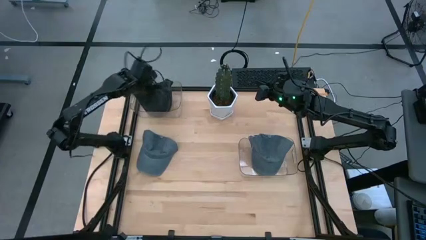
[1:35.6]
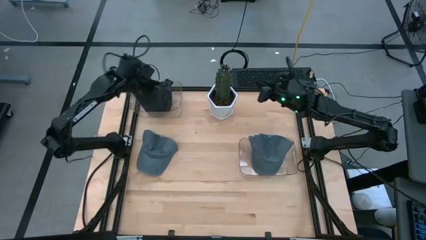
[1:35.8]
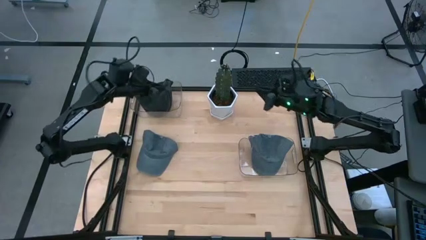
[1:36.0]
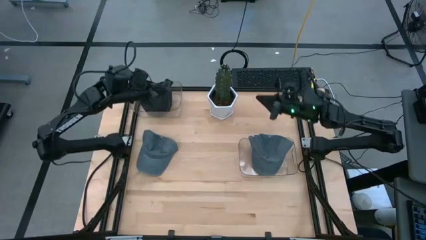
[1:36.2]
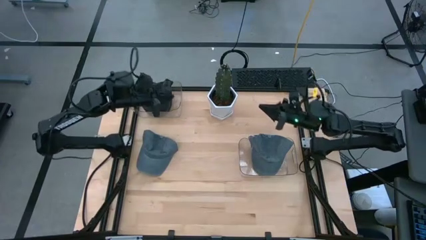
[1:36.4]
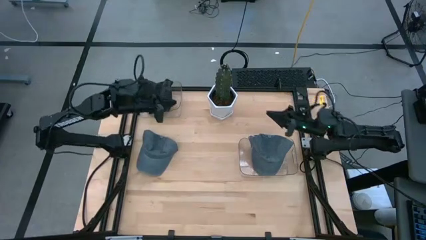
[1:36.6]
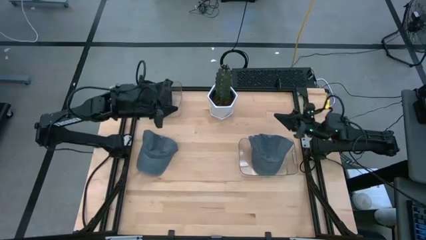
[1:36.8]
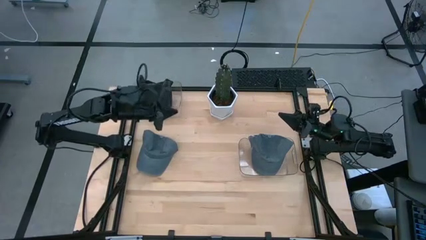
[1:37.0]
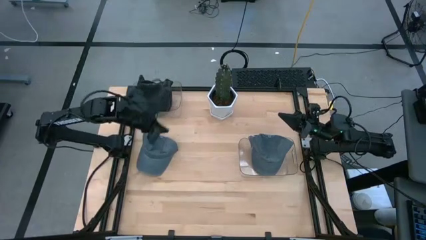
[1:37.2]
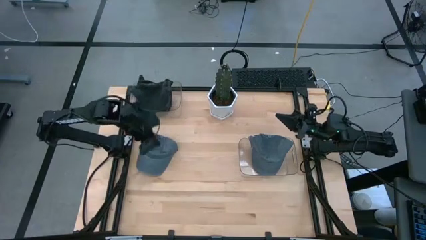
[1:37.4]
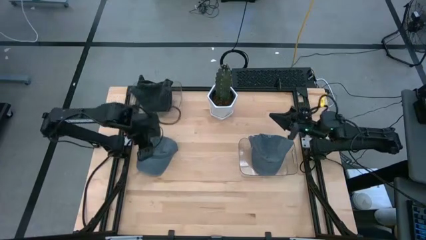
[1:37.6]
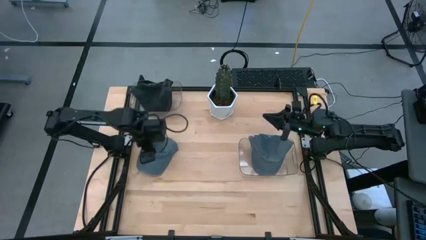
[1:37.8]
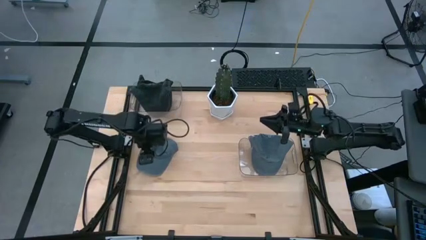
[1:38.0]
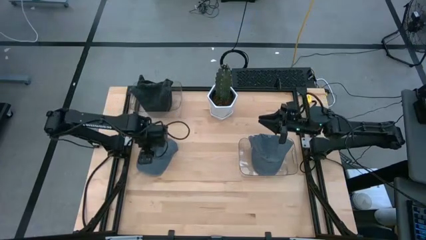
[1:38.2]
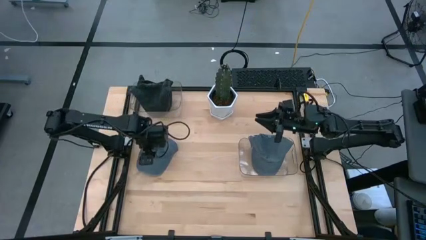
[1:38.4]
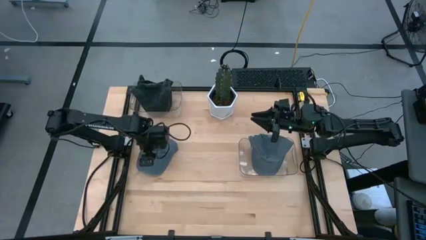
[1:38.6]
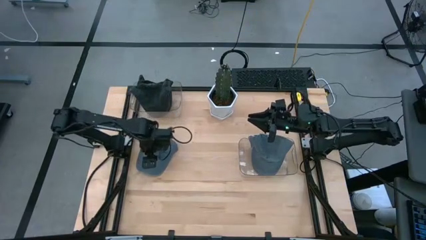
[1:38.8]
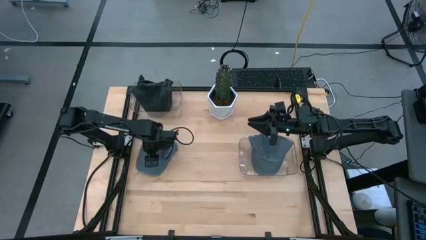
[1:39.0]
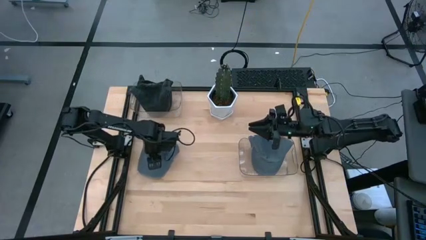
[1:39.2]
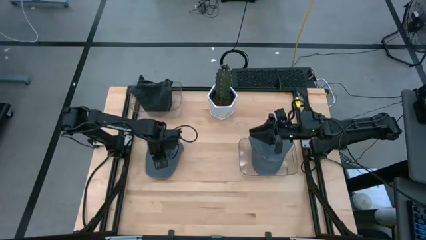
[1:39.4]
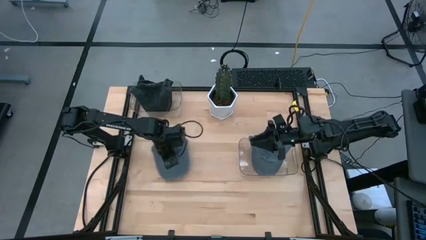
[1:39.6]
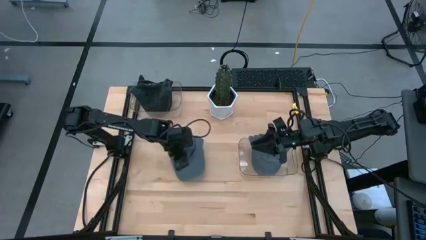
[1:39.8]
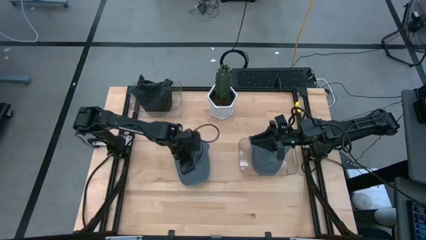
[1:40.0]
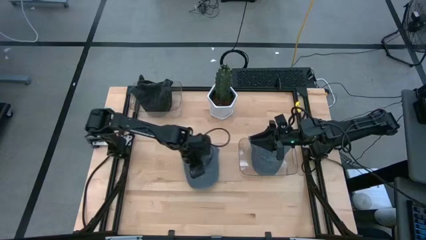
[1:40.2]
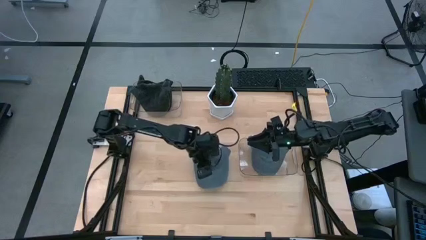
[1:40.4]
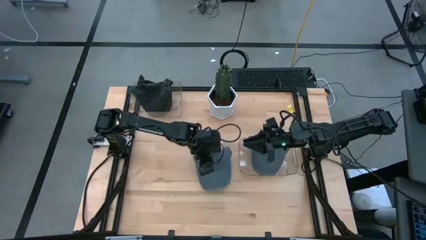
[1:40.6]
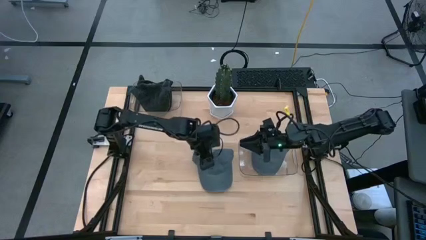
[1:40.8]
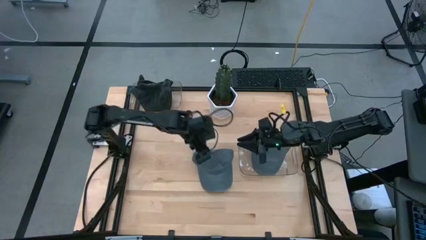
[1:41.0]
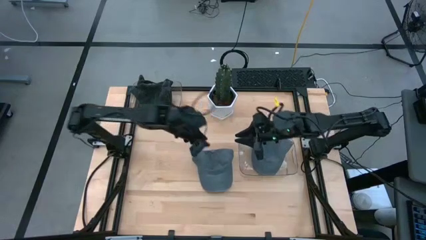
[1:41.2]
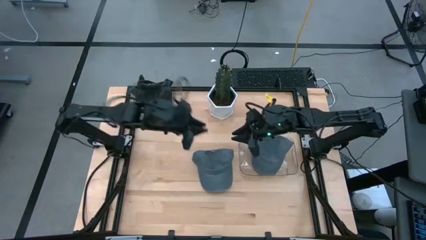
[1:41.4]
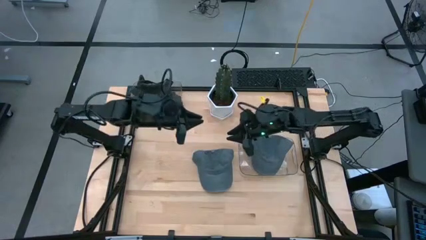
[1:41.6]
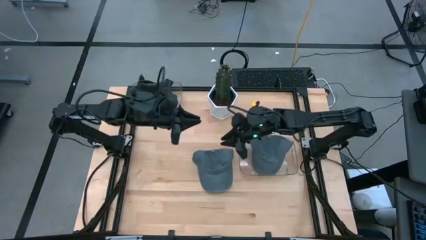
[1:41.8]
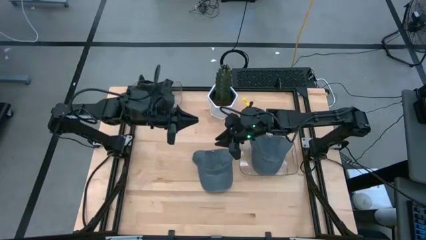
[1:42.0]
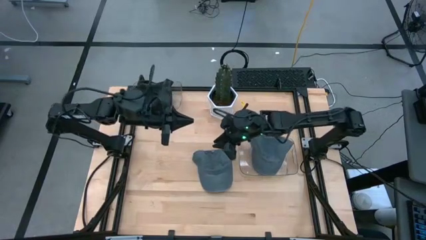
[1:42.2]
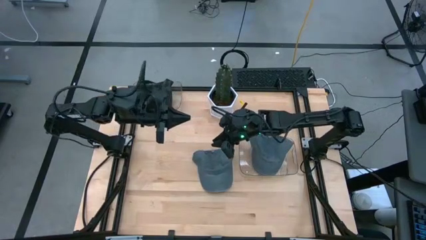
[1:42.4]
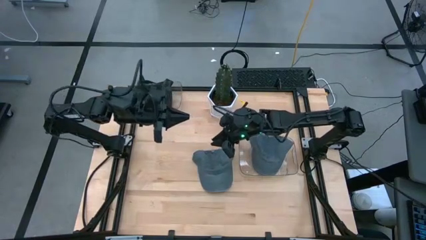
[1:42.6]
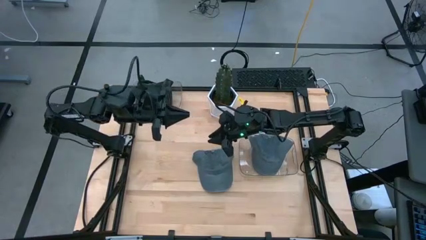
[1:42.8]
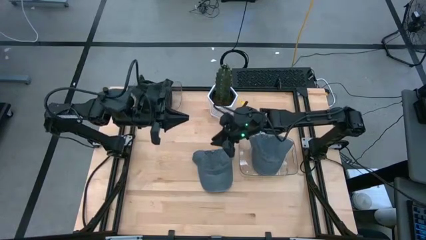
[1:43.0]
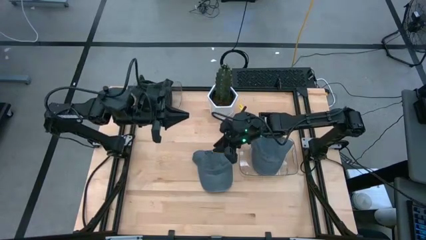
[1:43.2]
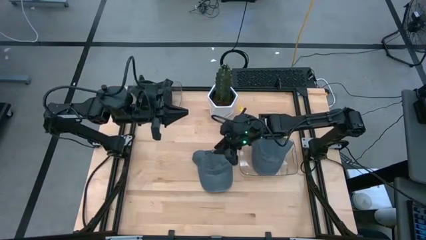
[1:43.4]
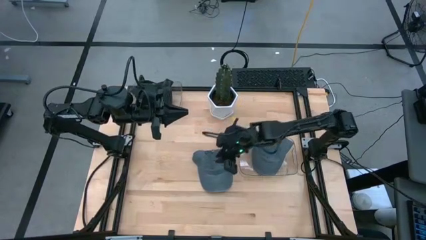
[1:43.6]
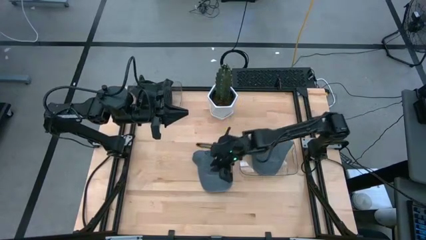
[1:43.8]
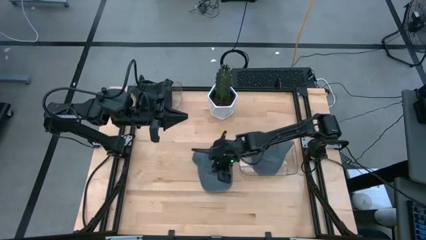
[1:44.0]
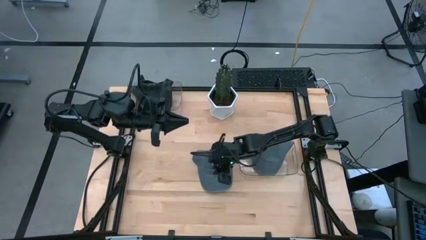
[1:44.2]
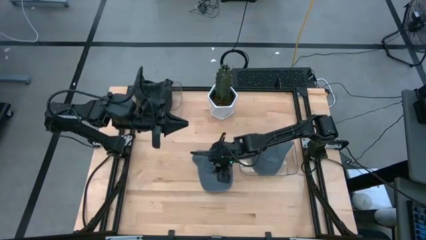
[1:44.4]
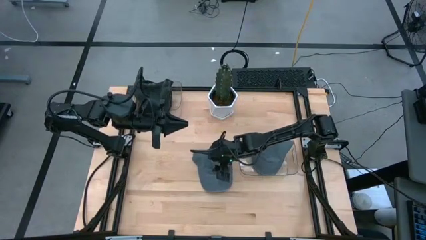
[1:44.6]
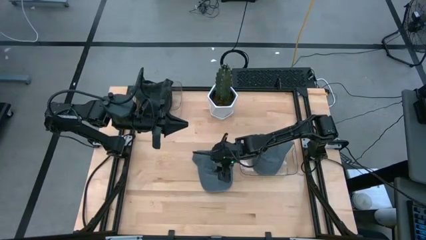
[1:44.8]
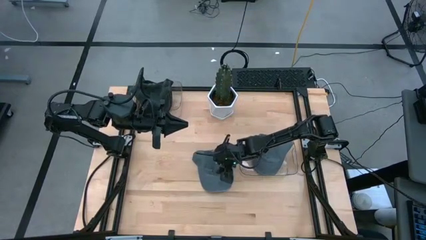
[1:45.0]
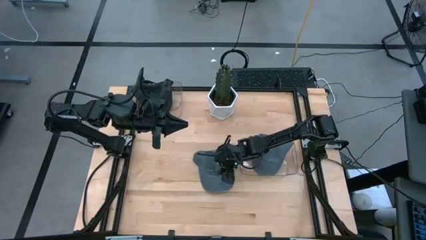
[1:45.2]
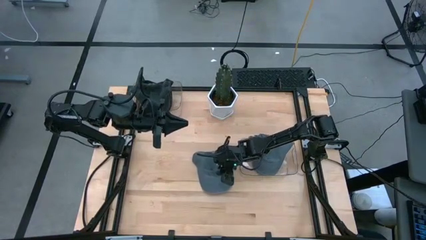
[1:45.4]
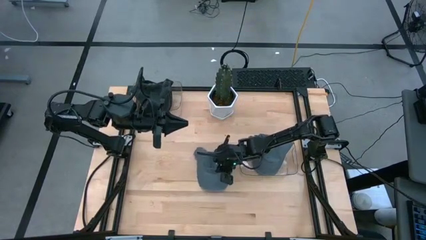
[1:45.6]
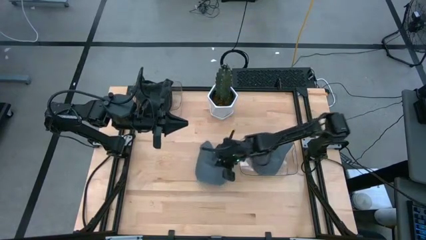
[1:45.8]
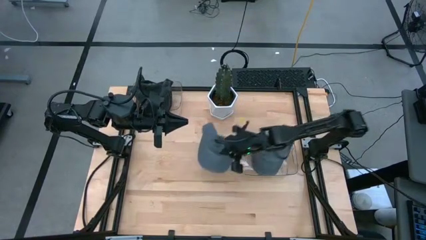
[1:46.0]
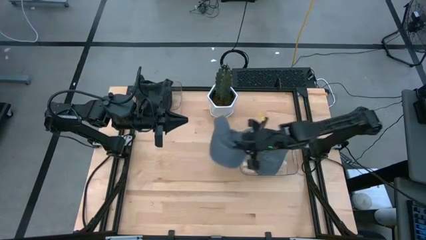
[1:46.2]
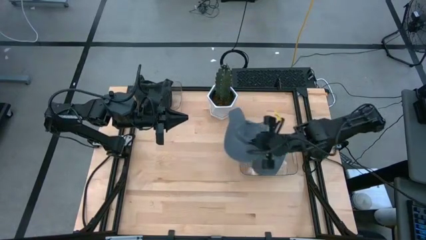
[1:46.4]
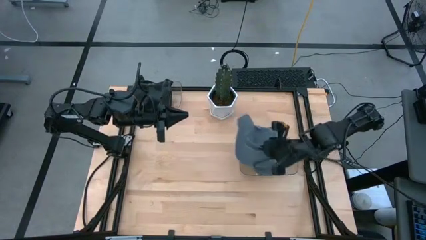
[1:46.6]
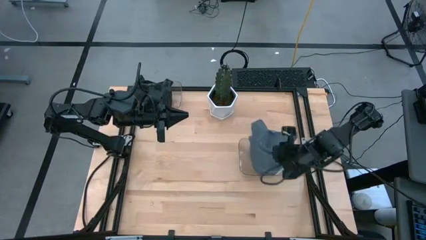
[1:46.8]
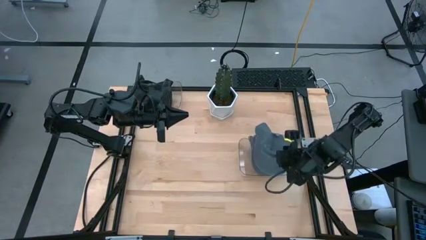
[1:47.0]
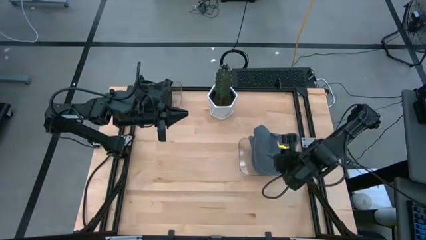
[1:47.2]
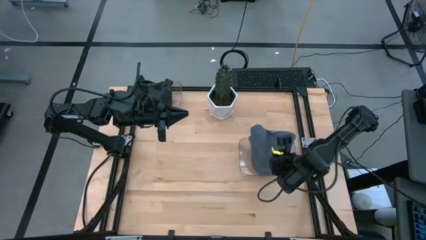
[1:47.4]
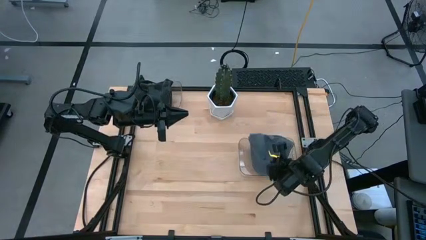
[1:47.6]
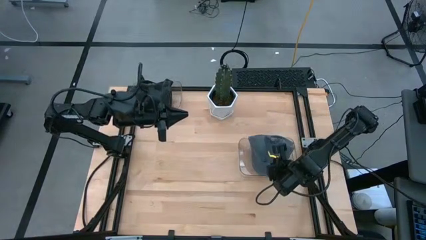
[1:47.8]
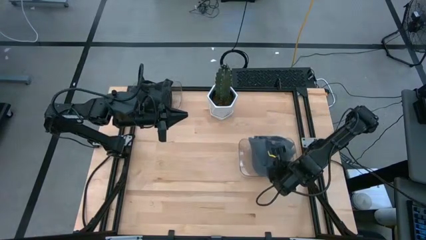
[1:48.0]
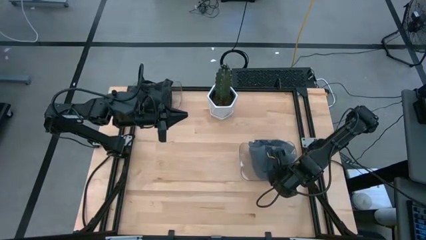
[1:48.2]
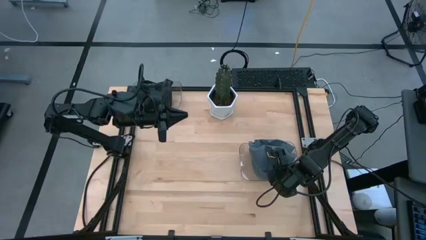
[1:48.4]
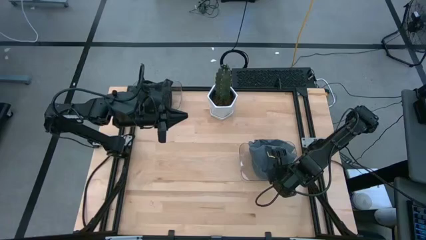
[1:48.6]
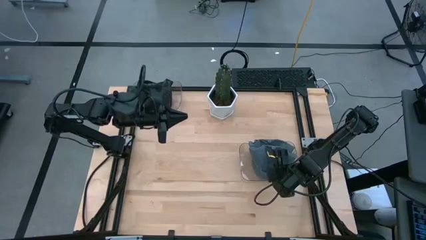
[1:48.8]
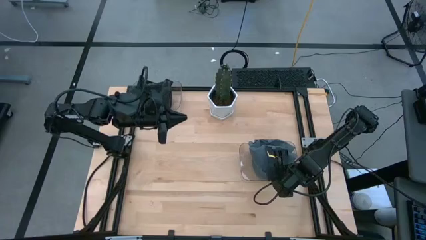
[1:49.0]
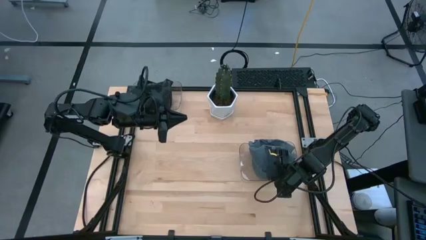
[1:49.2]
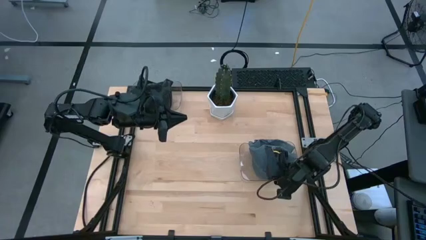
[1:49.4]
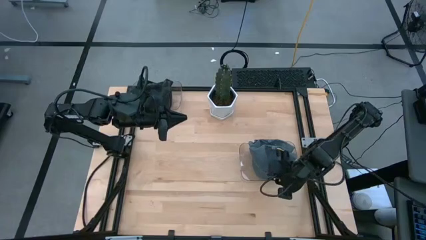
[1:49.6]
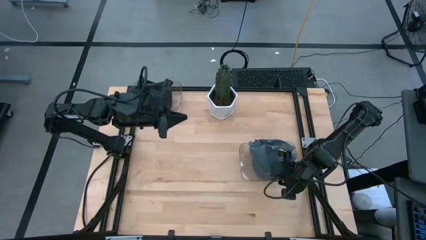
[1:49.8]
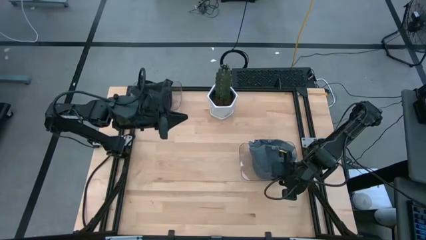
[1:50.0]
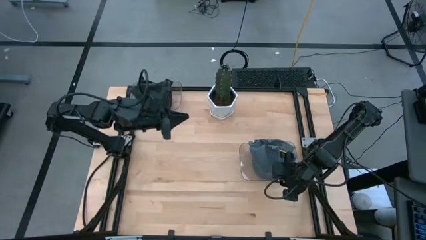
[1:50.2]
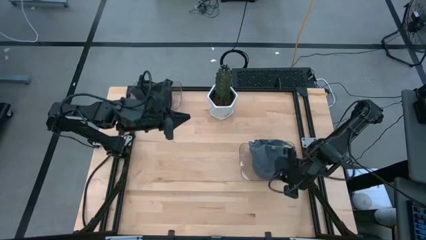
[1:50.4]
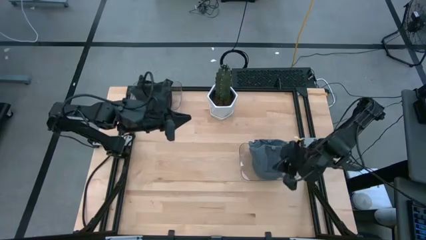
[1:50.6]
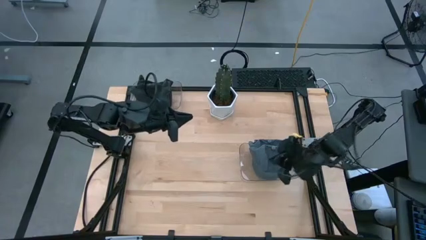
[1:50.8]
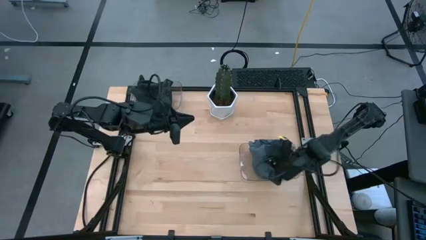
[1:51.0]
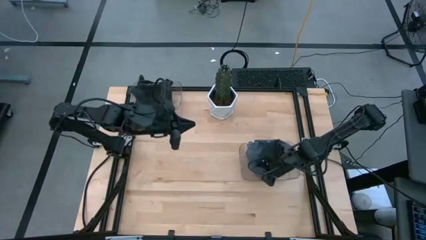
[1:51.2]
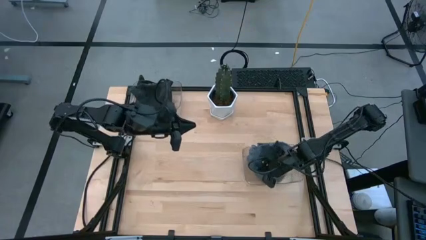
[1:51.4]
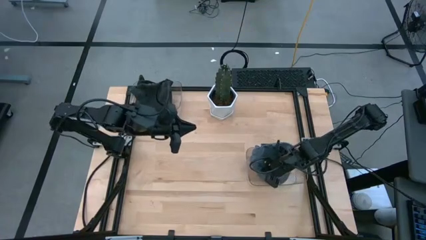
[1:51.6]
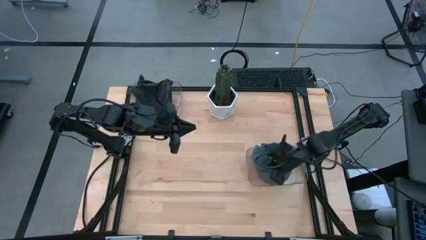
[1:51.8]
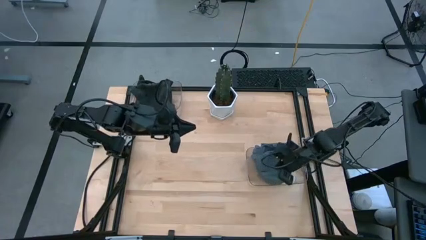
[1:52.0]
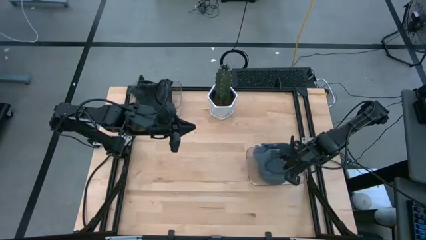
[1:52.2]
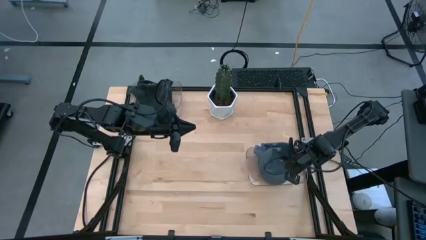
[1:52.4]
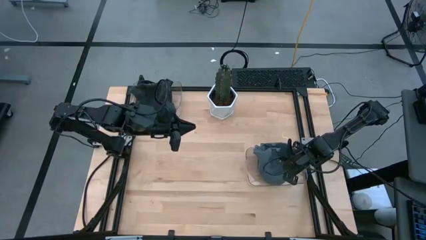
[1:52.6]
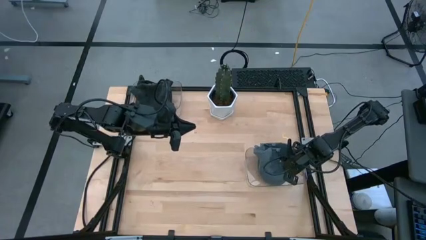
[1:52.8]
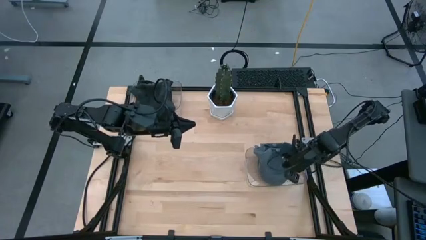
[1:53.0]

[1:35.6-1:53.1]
Task: Pick & Place hat
Put the gray cap into the bottom transparent bin
